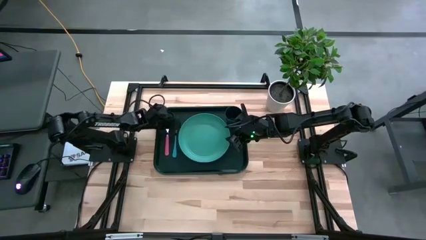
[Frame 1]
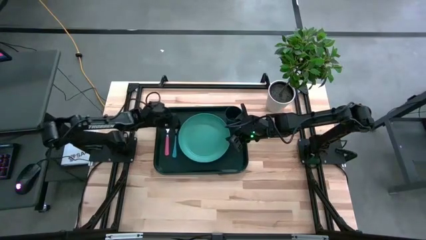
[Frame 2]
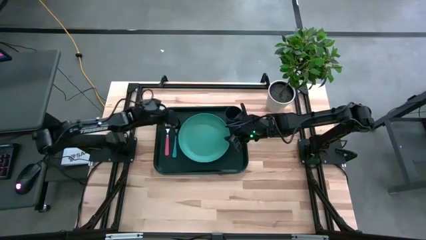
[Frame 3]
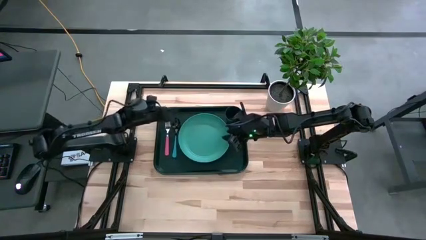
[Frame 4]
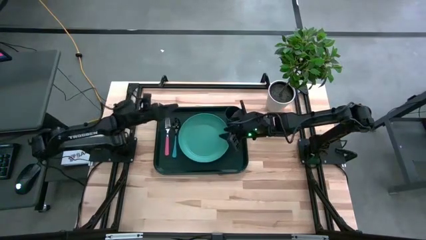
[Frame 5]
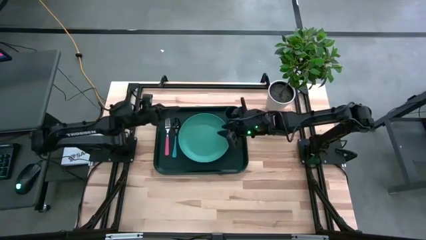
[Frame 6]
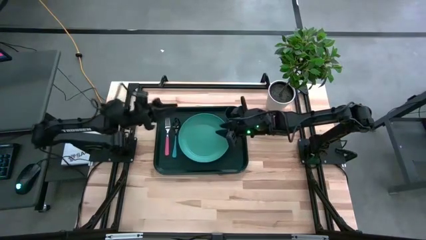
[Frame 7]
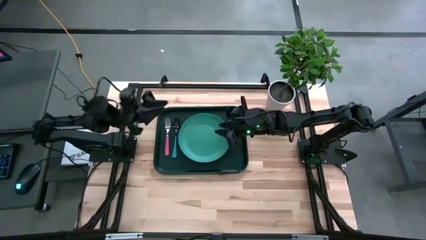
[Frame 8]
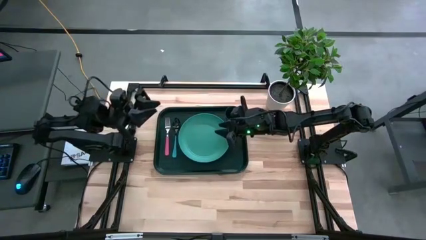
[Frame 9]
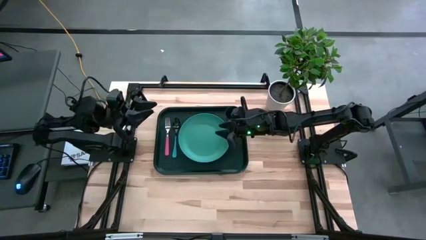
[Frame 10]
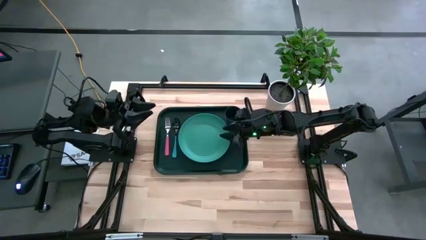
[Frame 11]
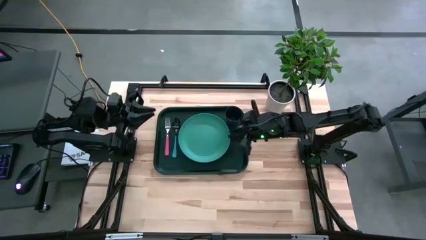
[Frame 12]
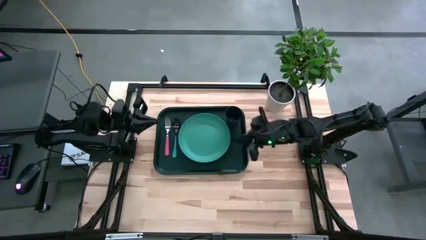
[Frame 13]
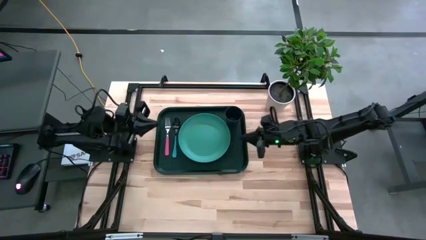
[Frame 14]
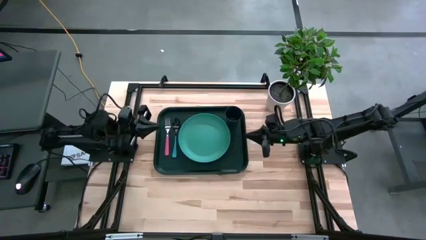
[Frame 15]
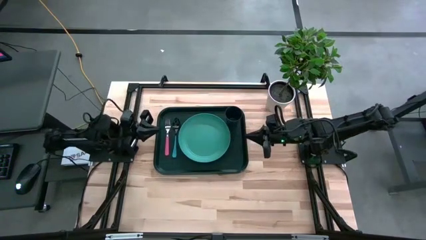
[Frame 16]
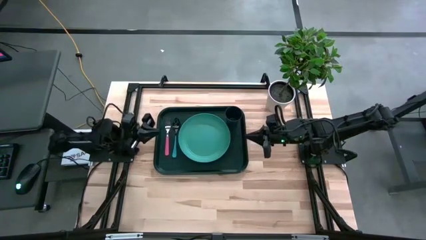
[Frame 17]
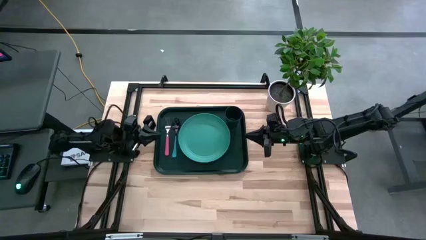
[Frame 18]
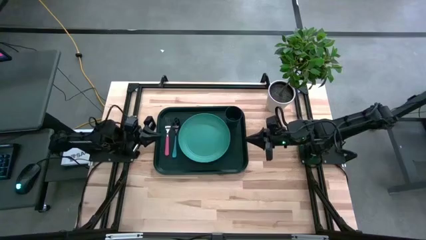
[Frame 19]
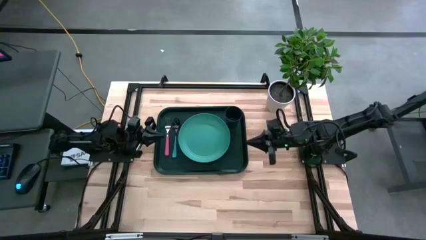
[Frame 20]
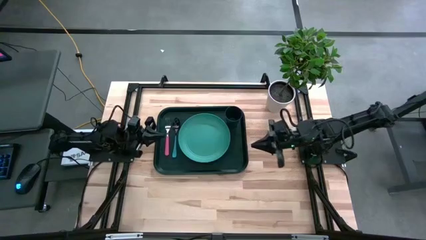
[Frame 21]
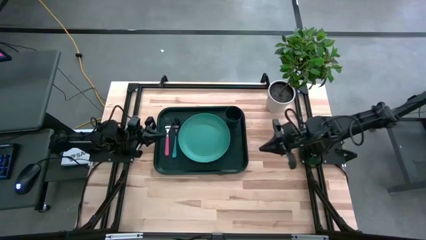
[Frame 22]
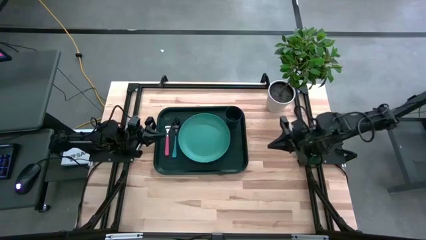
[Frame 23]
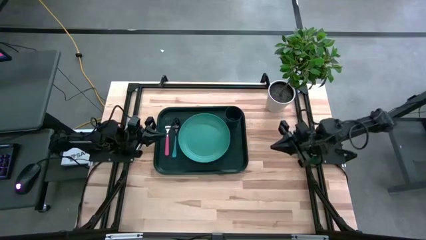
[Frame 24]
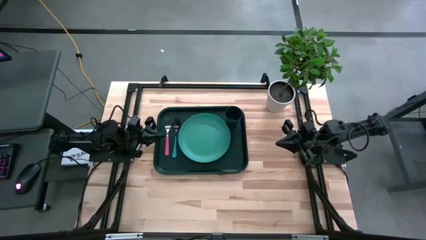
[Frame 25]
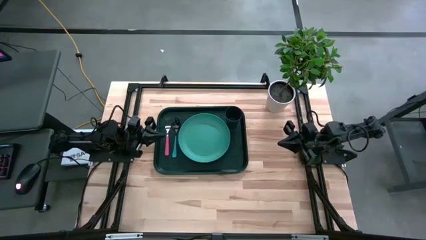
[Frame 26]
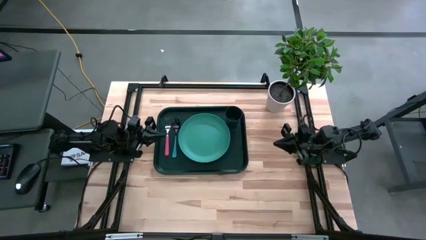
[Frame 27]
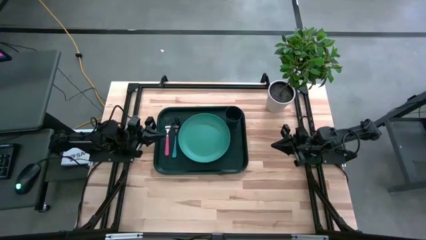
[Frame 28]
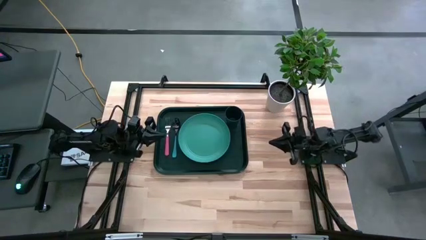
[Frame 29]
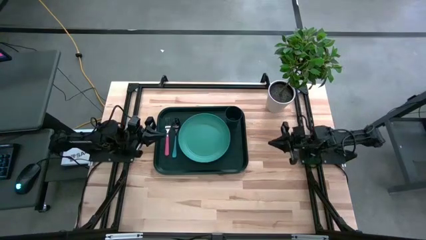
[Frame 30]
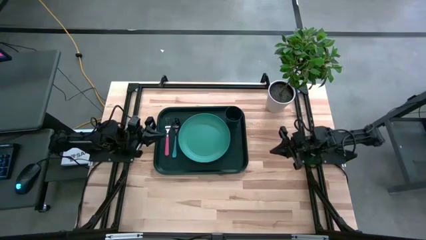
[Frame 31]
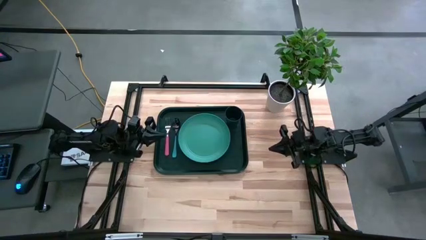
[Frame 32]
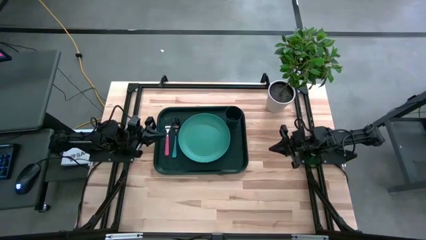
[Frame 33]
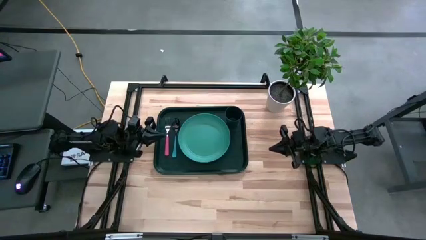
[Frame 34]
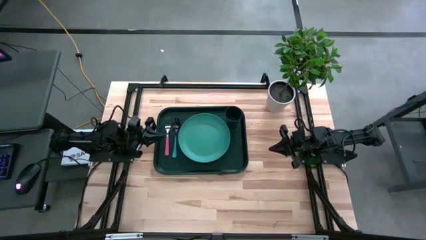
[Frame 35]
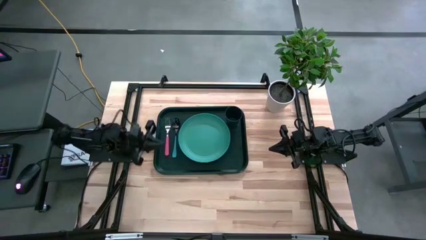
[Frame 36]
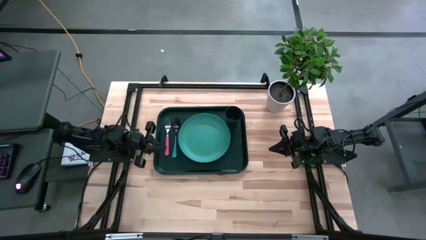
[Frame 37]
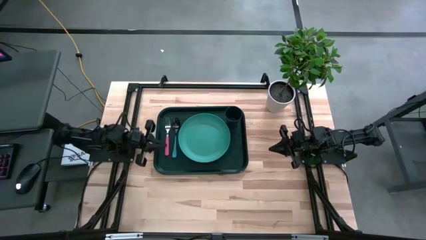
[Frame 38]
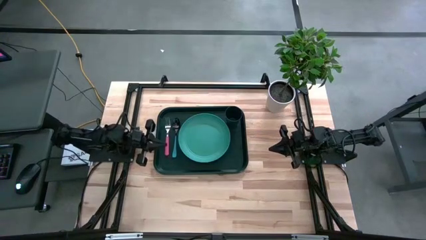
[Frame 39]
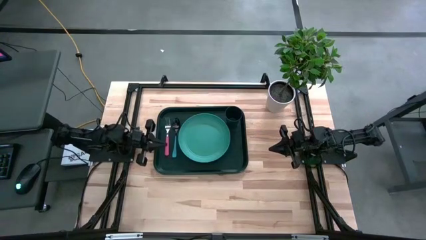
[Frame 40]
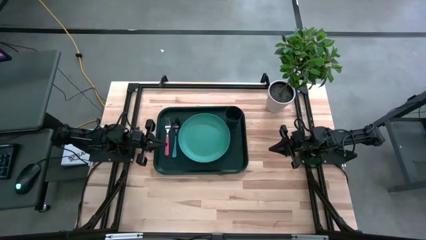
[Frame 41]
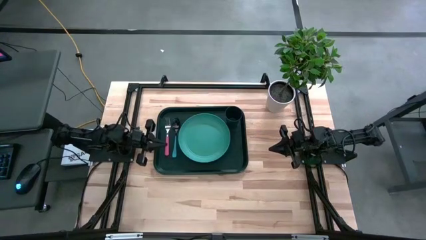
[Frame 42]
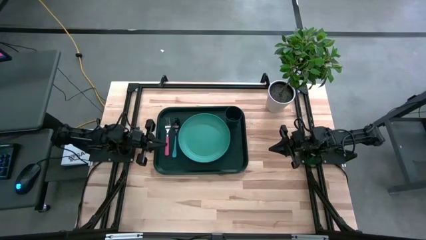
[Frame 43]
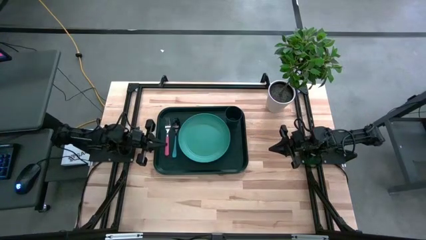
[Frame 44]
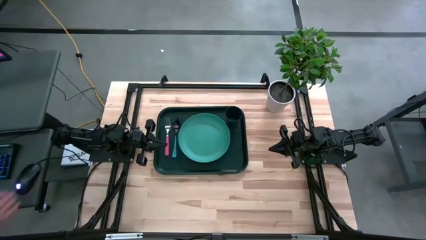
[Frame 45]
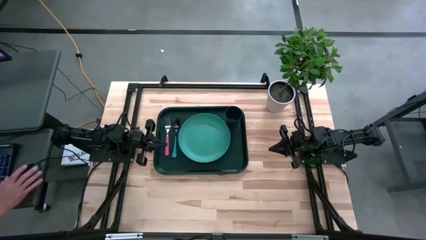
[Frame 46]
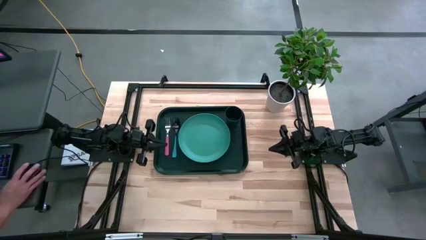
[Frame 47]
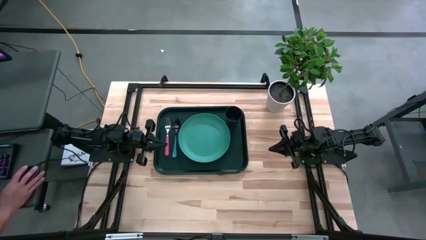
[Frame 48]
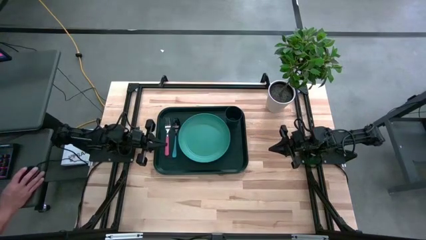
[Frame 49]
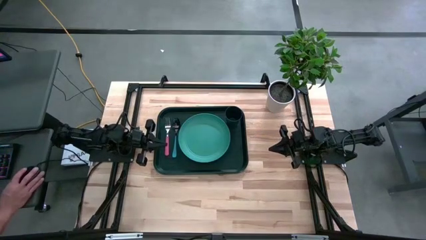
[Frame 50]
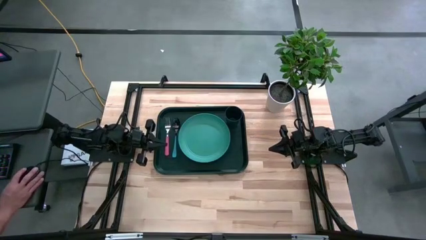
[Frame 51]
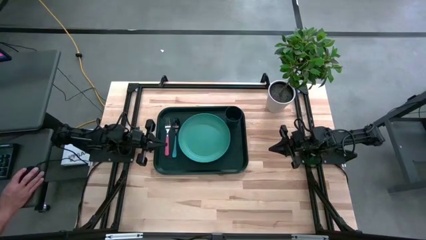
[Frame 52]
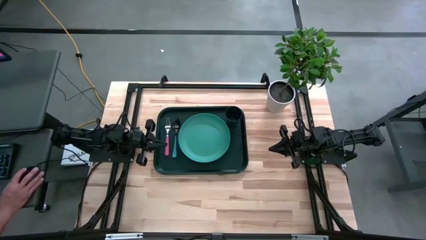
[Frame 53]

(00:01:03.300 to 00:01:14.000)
Task: Pick and place plate/cup/fork/spoon on tray
Return to Home Position
